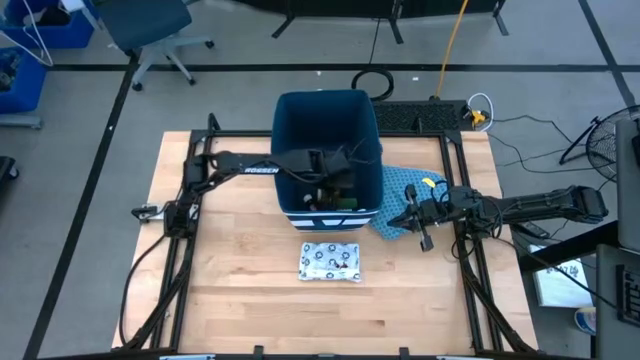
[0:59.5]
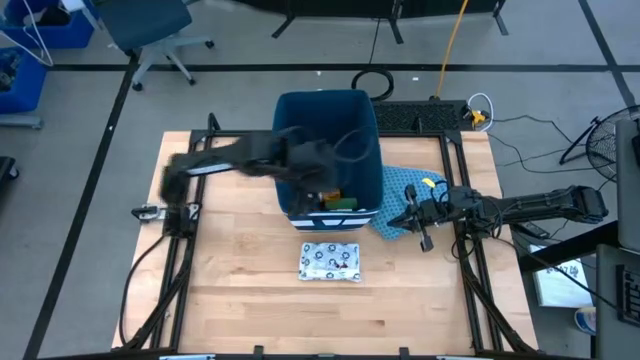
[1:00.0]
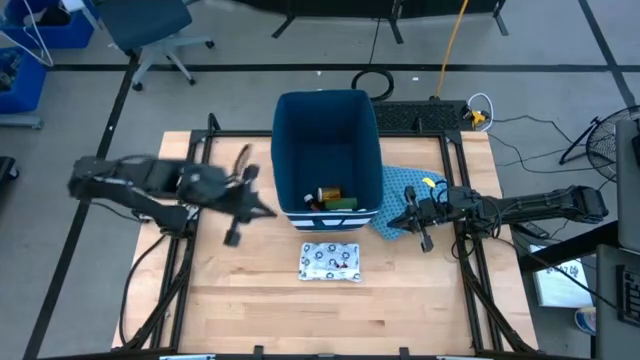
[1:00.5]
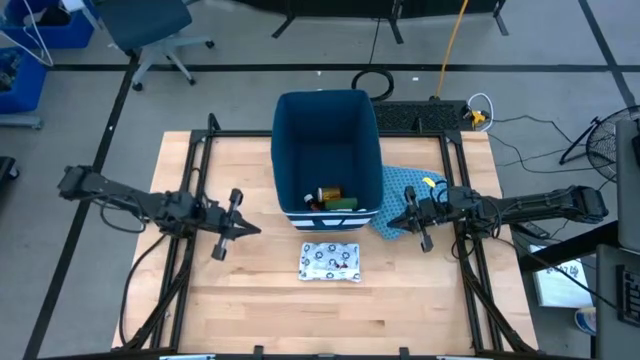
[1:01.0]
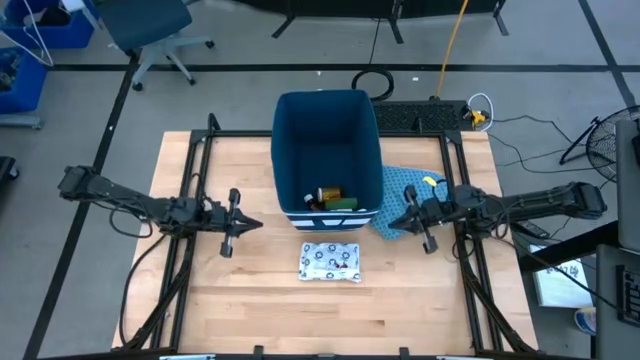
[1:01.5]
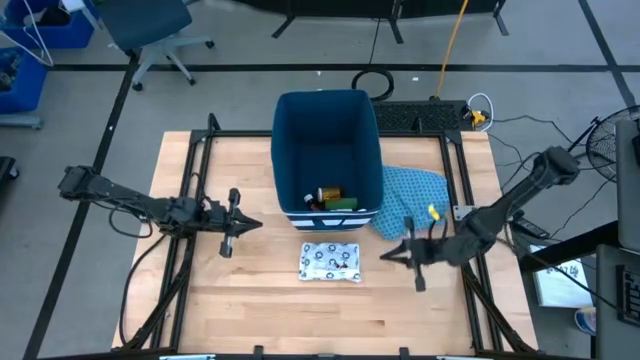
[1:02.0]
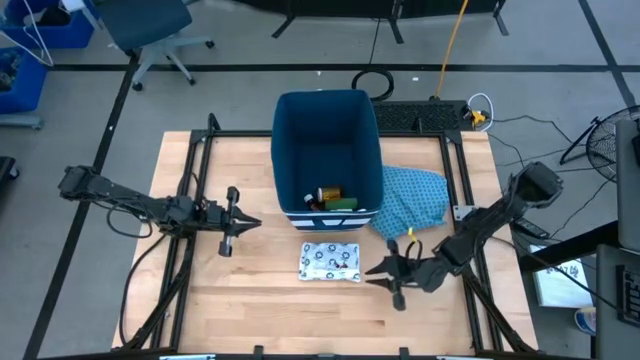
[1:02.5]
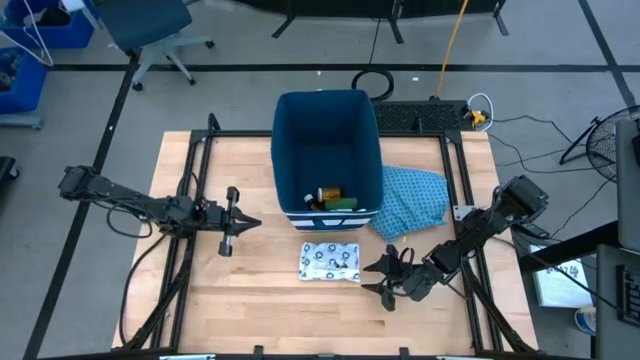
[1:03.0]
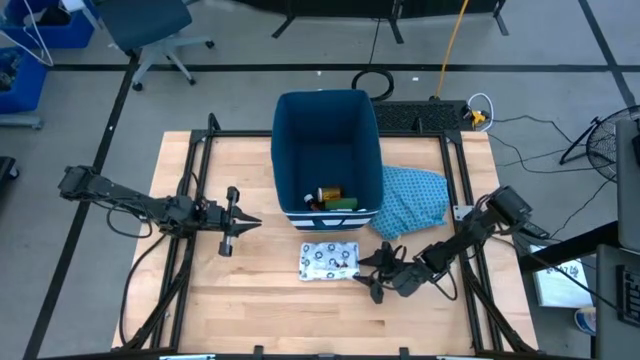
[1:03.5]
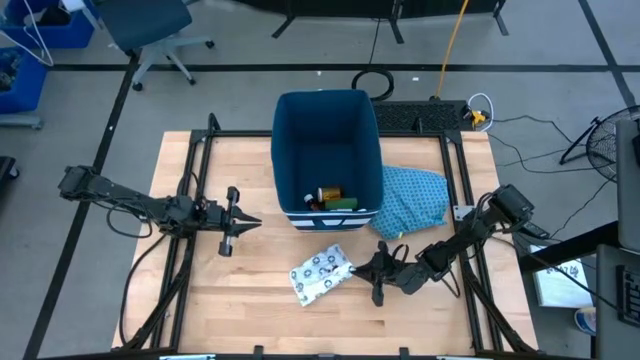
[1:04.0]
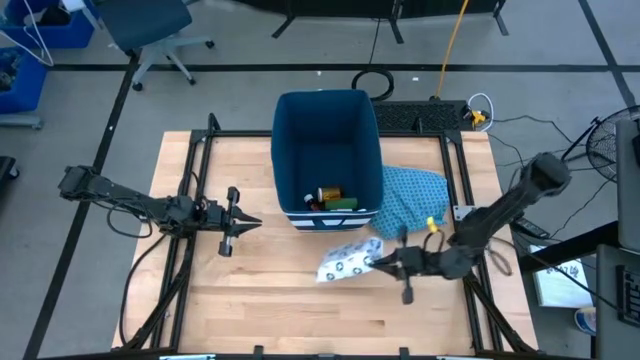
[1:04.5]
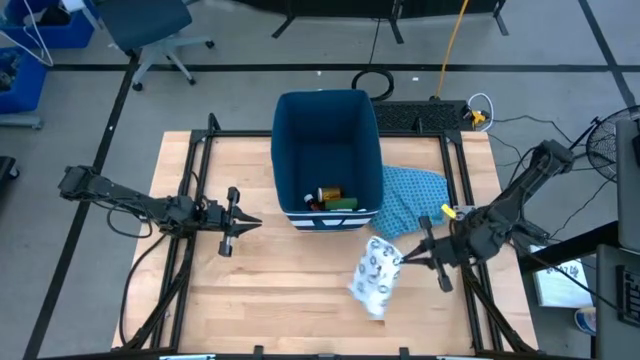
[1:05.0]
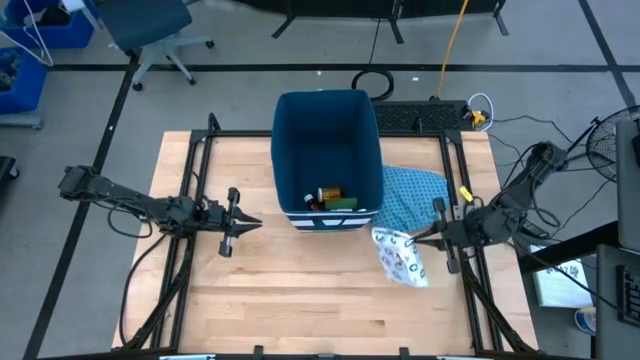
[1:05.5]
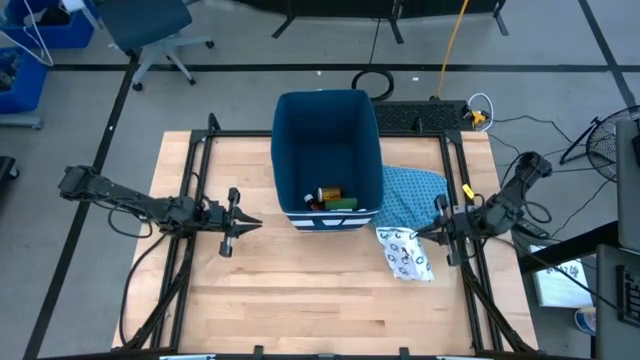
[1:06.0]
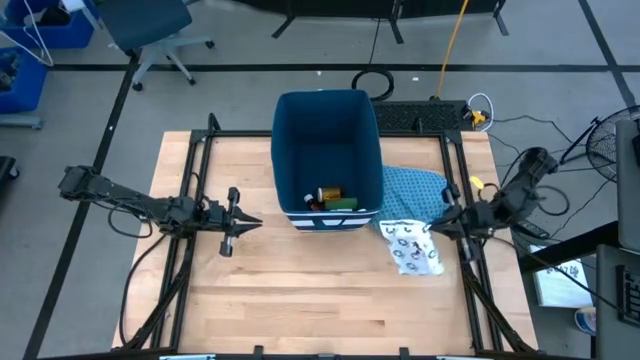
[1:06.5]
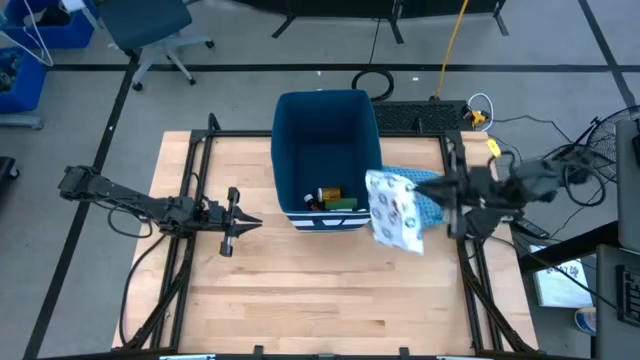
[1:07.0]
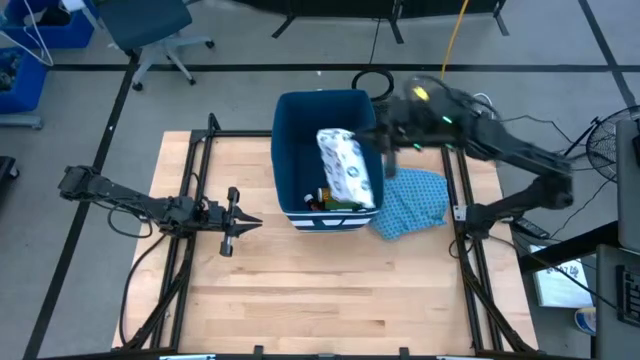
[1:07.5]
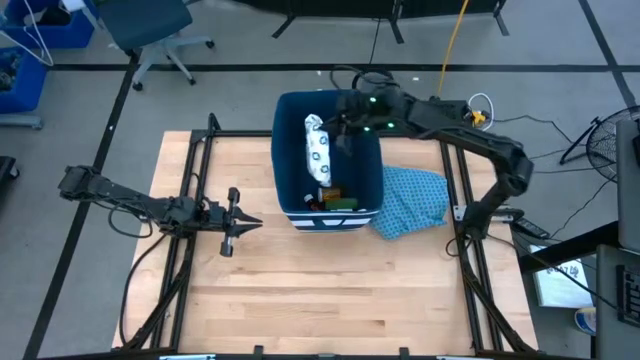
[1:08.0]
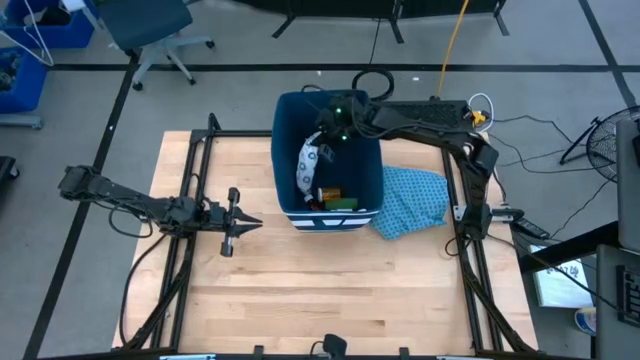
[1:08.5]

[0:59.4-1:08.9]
Task: Pick & place medical supplies in basket/bin
Put the white mailer bag into the blue bin

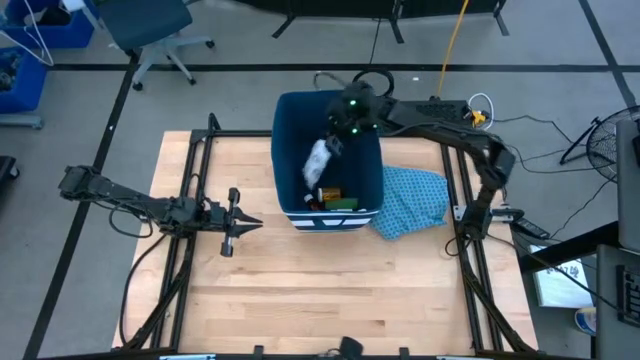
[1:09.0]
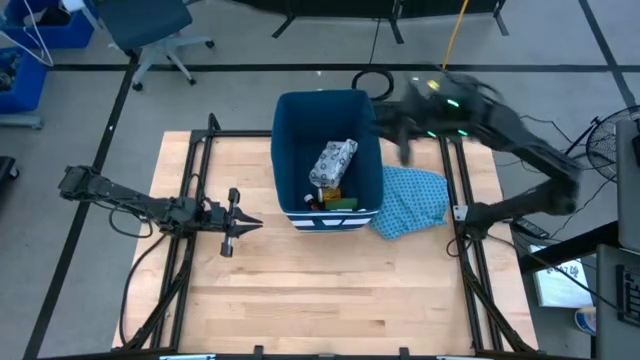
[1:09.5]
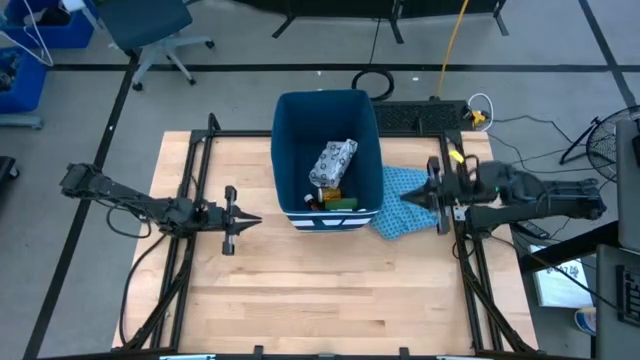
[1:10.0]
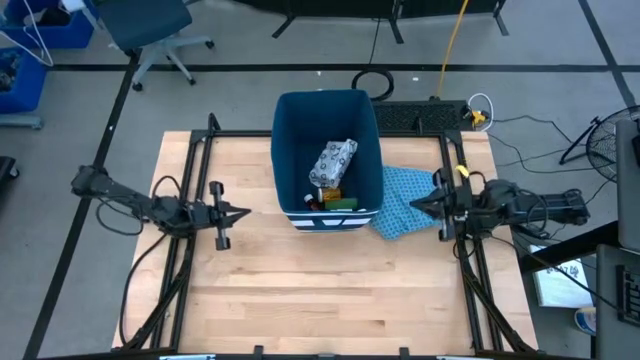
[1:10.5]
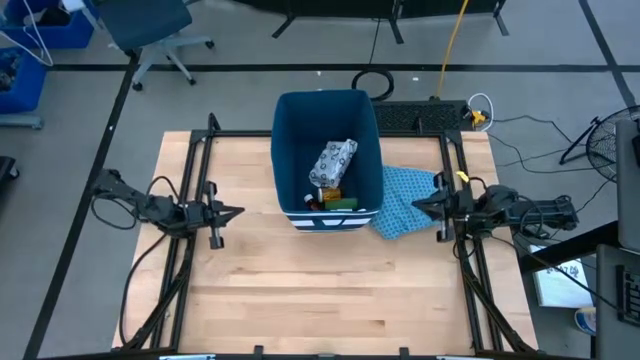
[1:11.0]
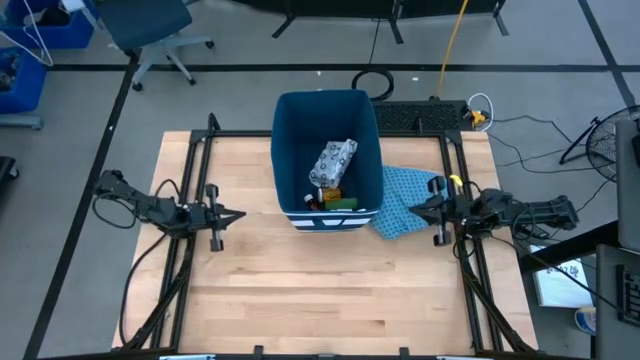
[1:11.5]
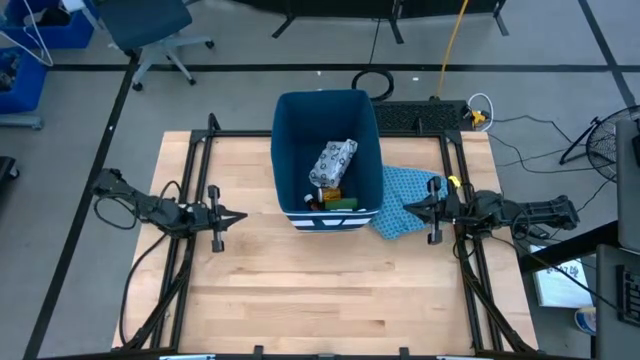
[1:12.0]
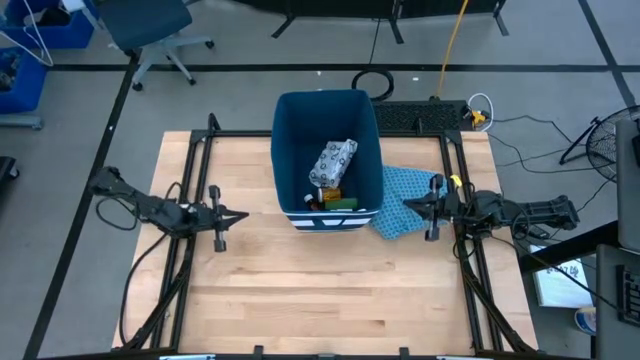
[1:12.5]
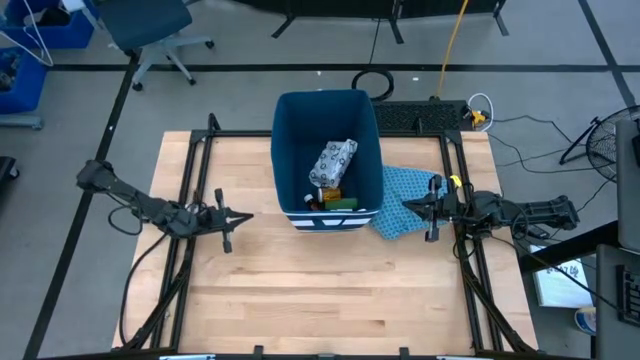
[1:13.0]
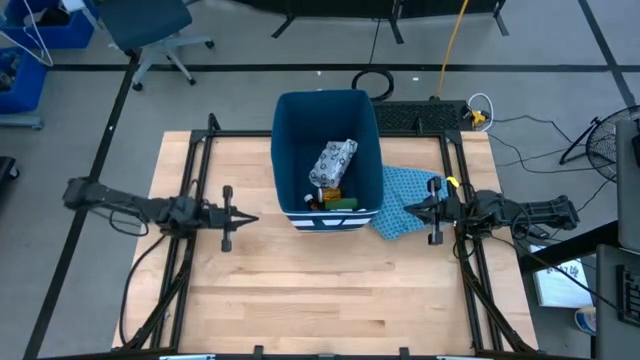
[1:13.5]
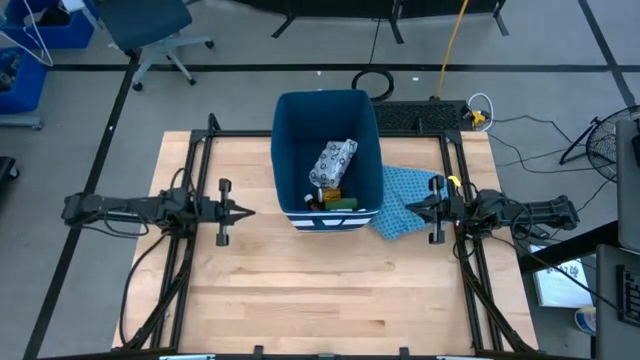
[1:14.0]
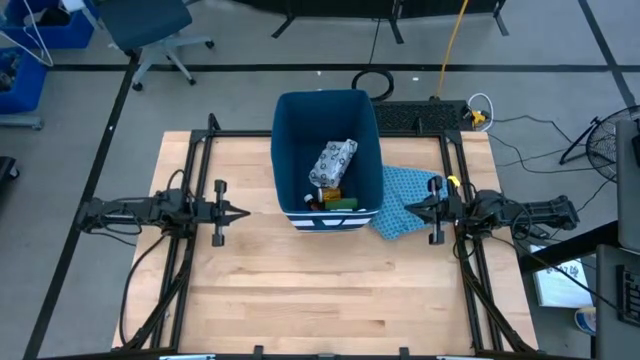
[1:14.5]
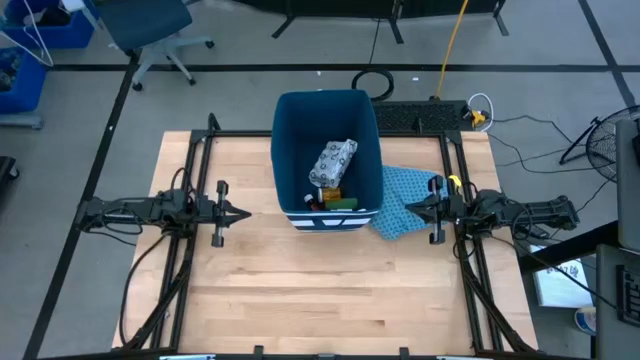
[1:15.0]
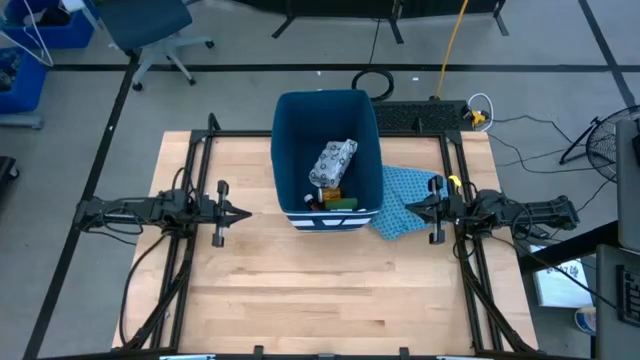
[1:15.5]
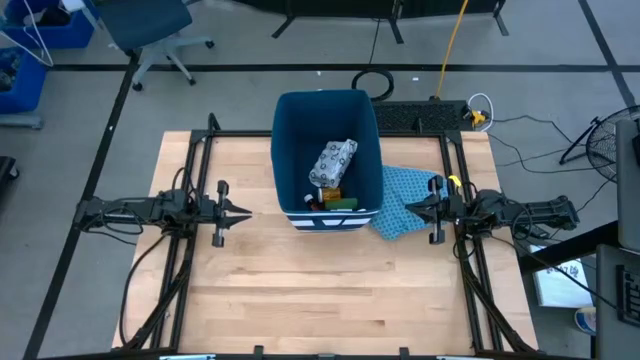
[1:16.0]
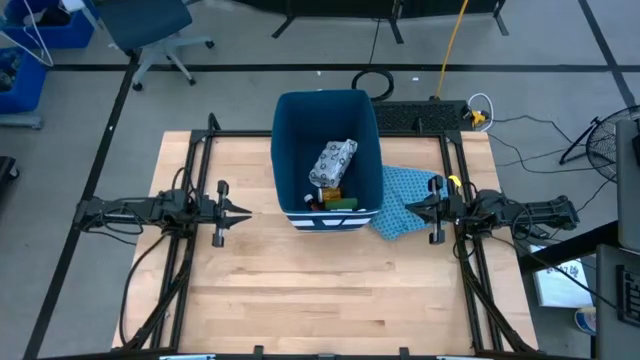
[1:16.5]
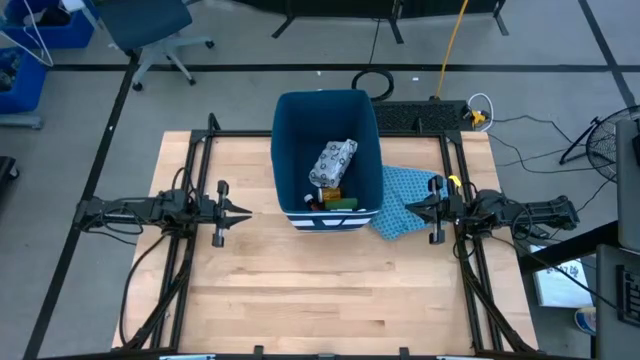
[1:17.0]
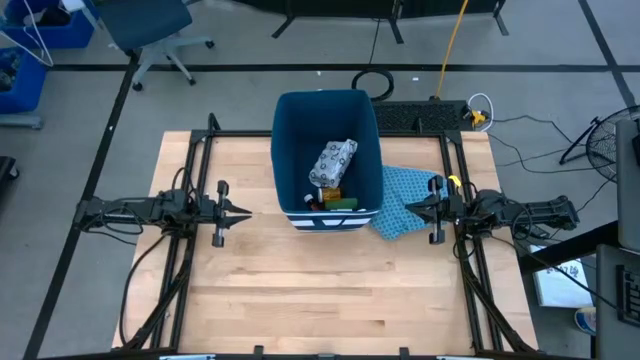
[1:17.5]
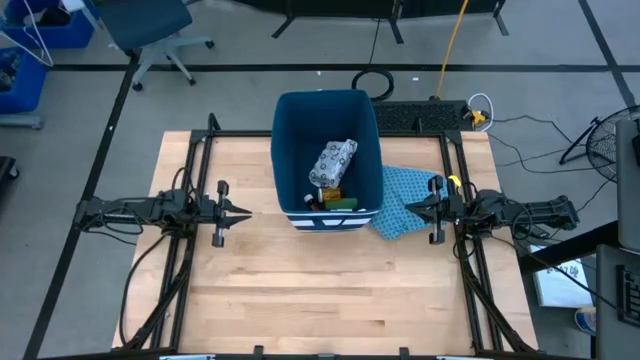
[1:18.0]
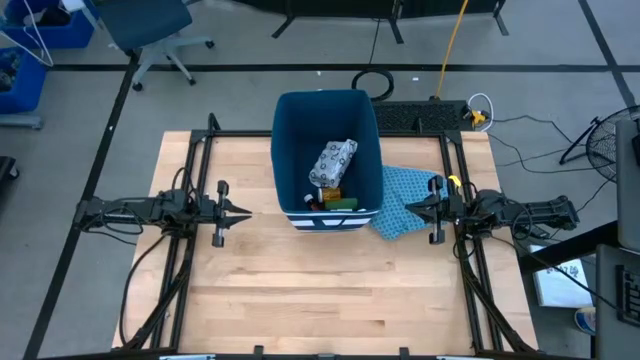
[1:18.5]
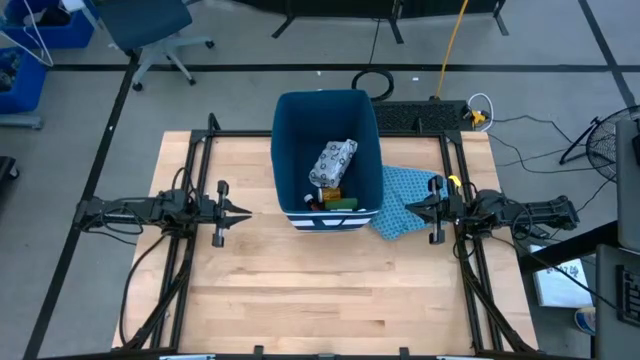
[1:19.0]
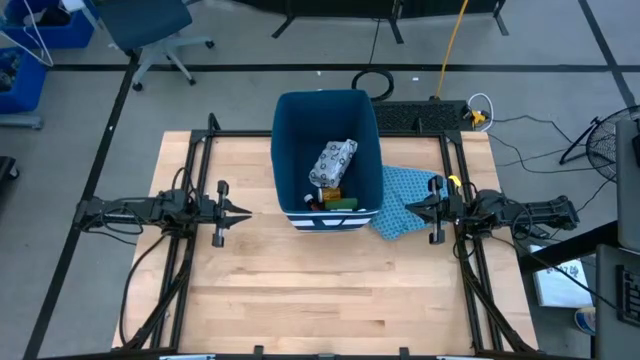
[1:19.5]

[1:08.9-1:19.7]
Return to Home Position

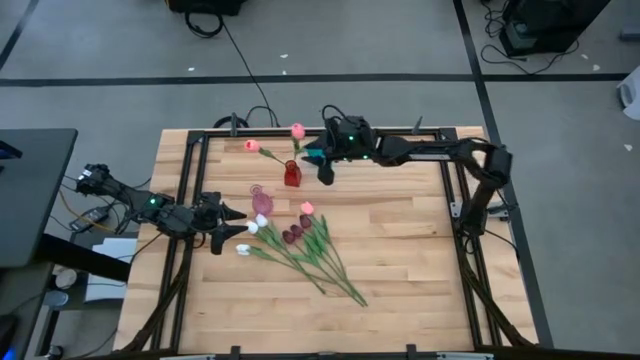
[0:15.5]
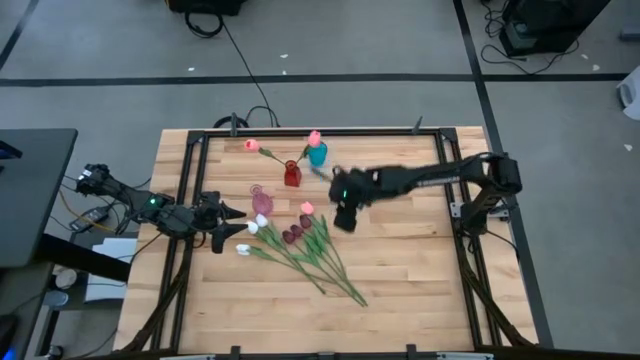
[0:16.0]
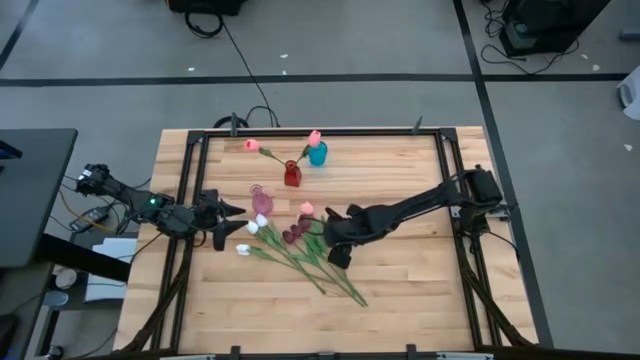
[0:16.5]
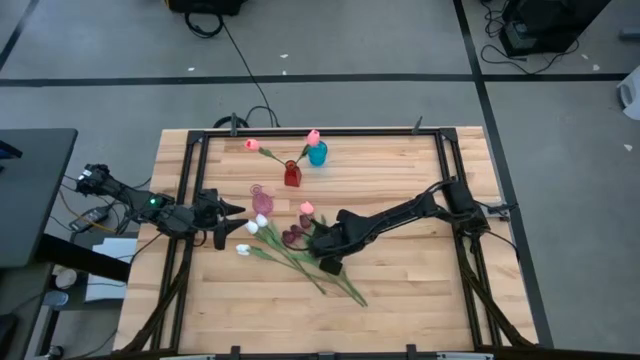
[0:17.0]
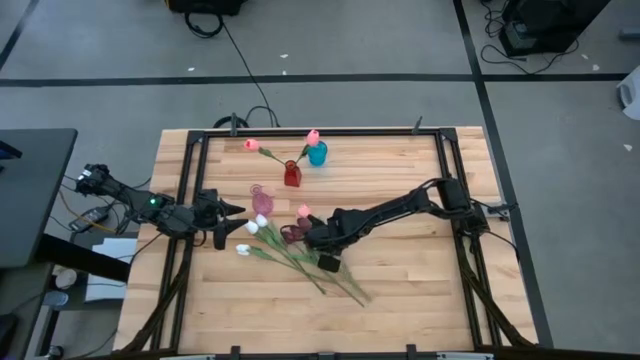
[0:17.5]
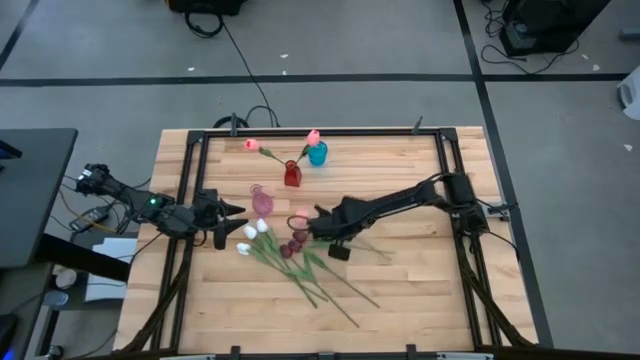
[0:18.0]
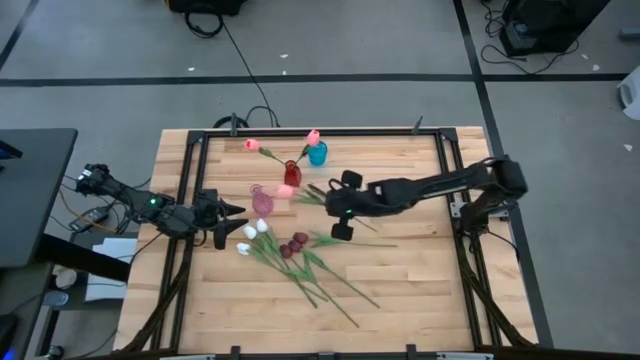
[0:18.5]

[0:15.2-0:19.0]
Task: Sort flowers into vase by color
Put the pink tulip into the red vase
